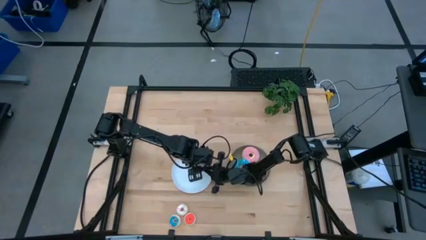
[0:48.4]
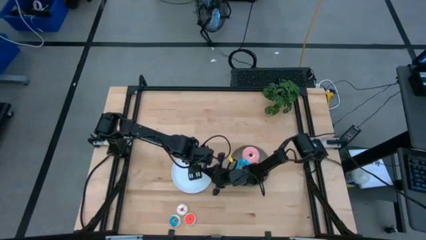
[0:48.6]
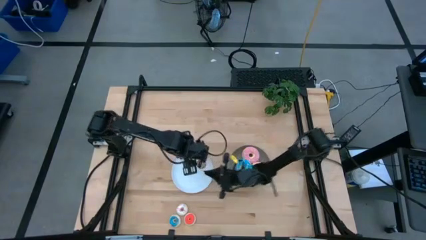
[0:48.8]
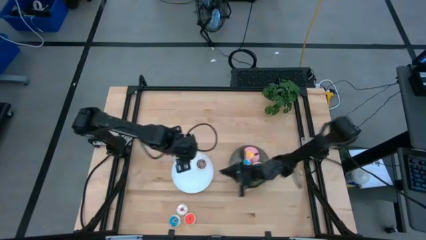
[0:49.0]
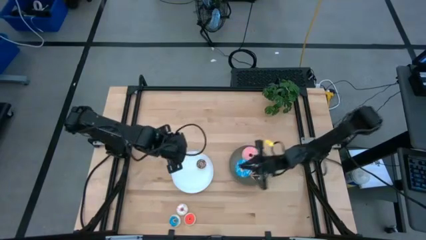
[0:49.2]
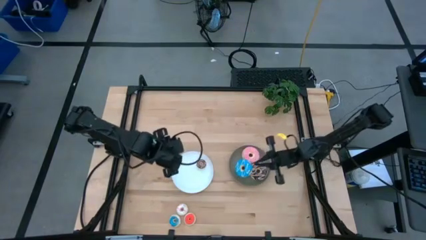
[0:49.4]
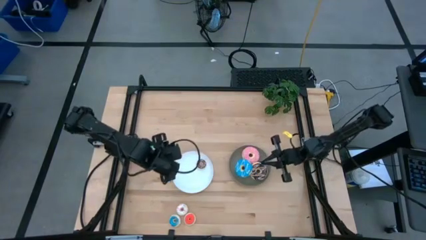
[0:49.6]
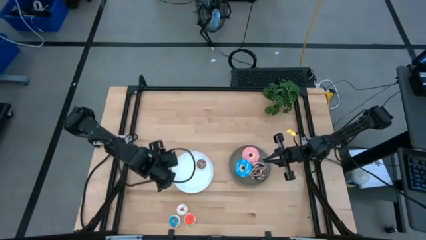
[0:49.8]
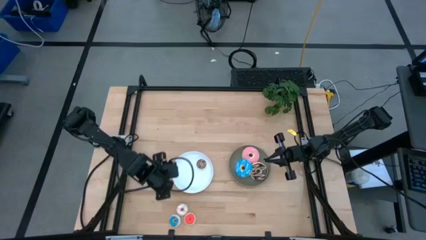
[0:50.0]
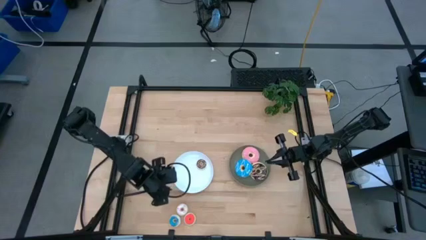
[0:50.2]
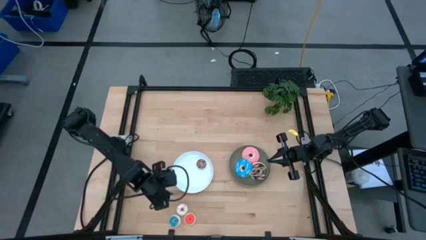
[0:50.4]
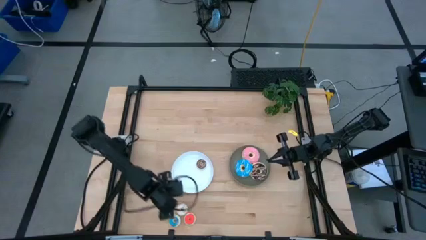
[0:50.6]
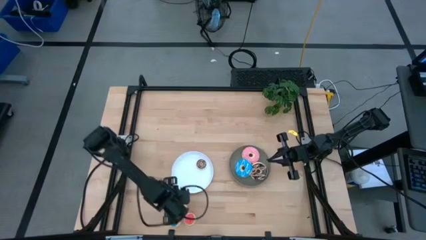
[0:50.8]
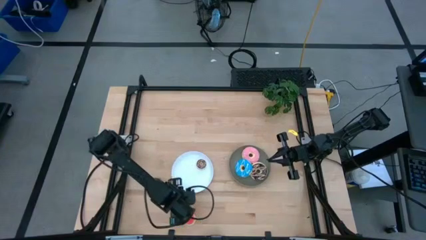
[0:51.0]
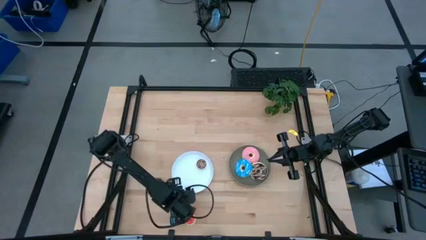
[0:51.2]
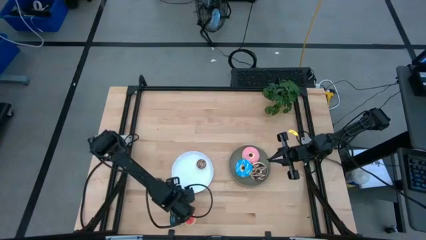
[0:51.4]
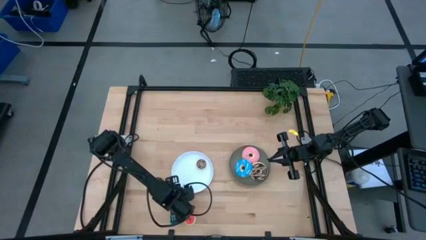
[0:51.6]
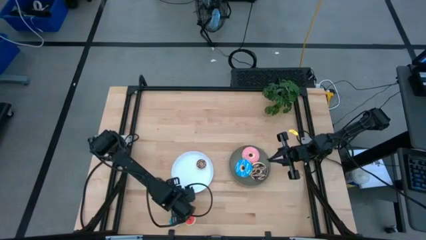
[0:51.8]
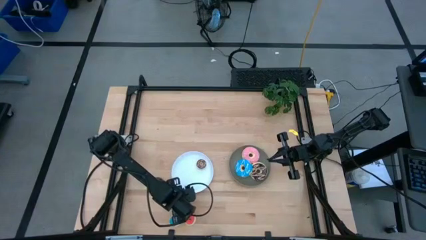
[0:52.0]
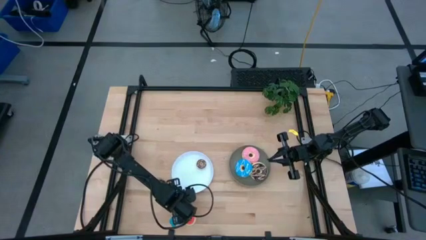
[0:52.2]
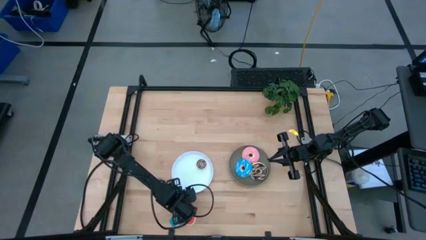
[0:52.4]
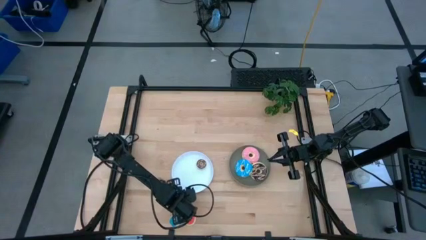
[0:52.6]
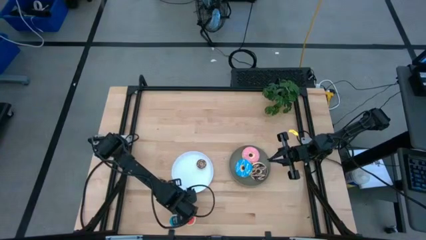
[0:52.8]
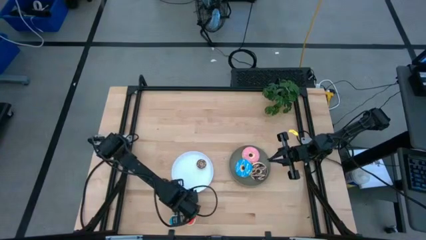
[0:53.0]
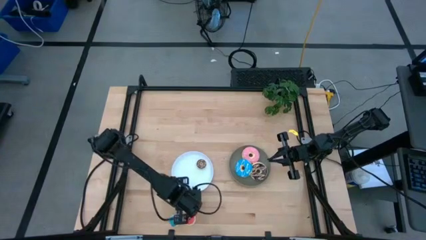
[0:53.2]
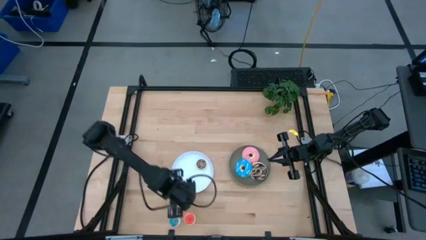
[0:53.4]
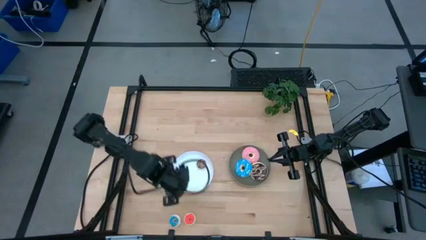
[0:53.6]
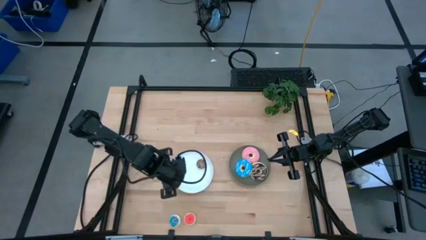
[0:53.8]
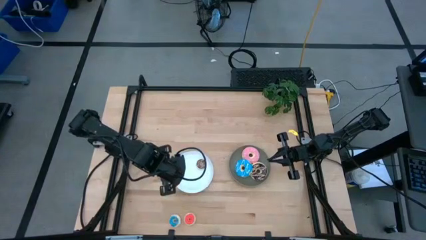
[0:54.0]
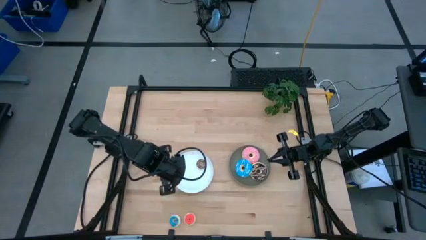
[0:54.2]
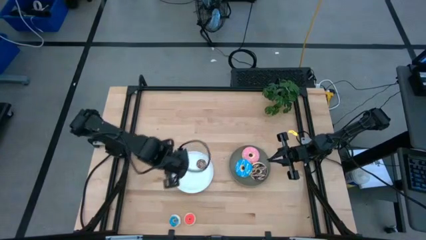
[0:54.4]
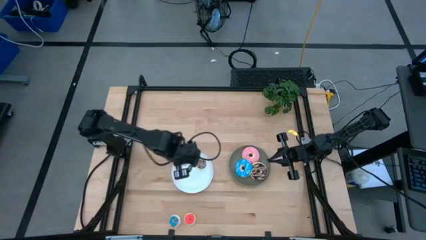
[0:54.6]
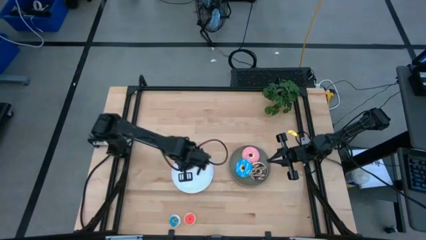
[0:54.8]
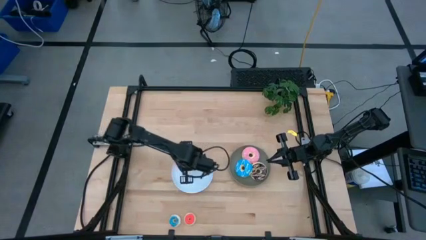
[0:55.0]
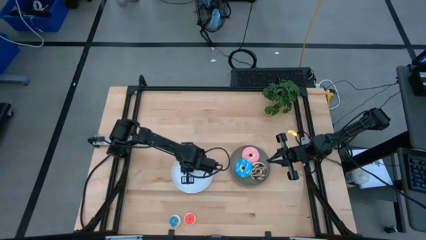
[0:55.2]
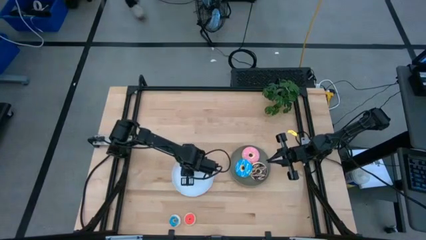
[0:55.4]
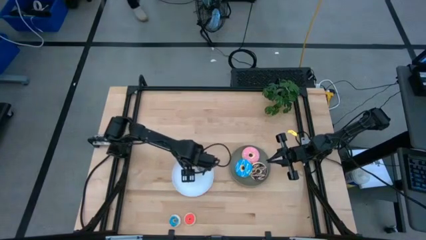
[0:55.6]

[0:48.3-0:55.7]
Task: Pick & Place donuts
Put the small white donut on the white plate

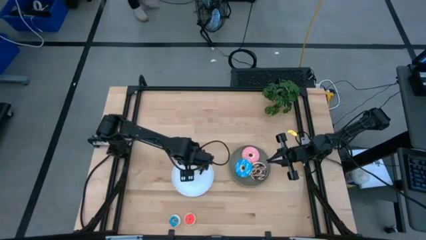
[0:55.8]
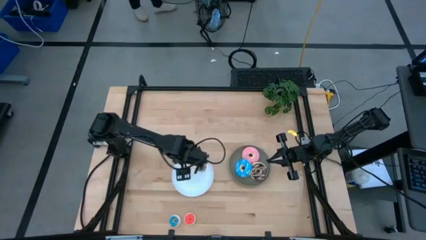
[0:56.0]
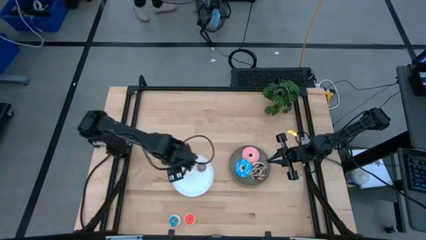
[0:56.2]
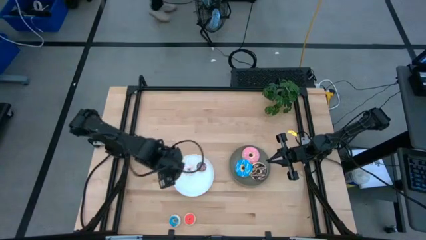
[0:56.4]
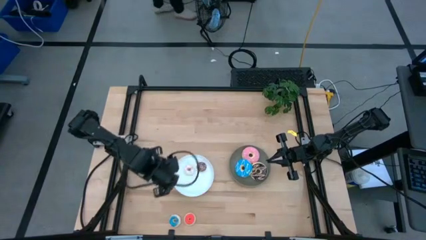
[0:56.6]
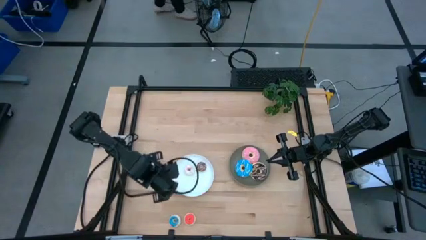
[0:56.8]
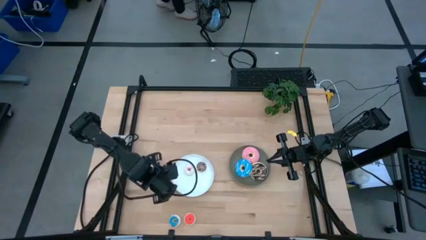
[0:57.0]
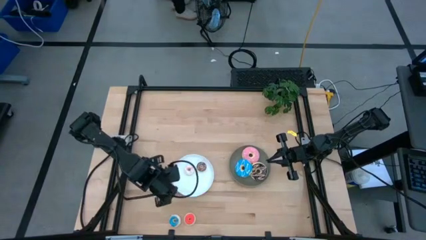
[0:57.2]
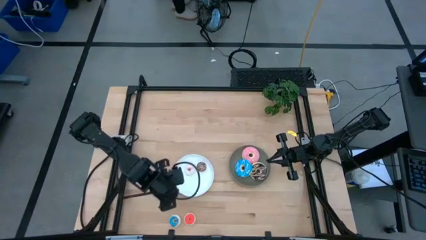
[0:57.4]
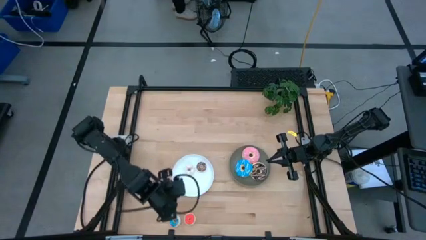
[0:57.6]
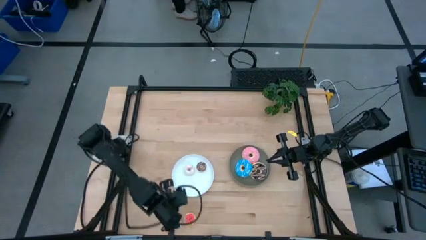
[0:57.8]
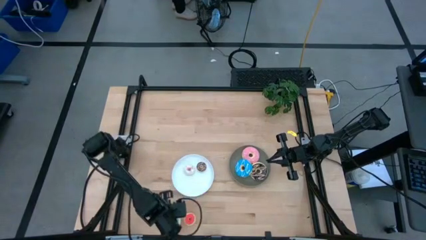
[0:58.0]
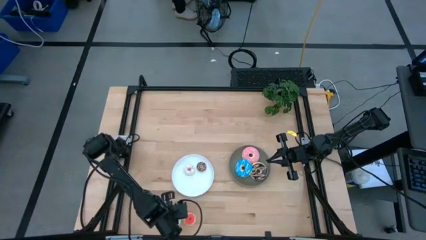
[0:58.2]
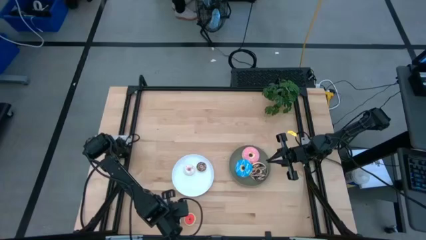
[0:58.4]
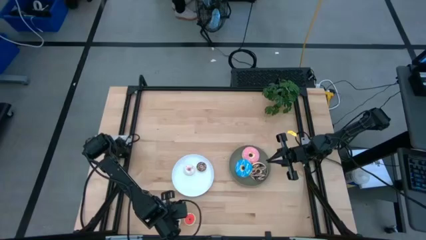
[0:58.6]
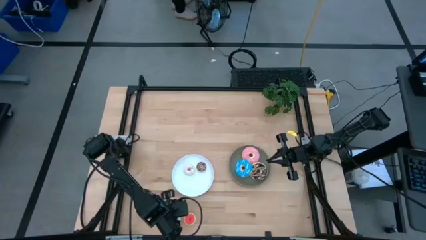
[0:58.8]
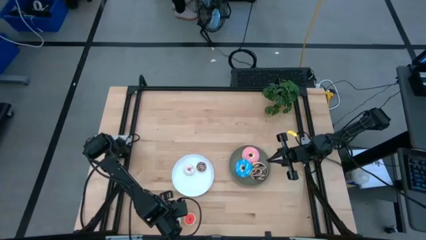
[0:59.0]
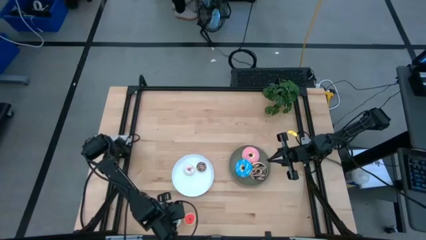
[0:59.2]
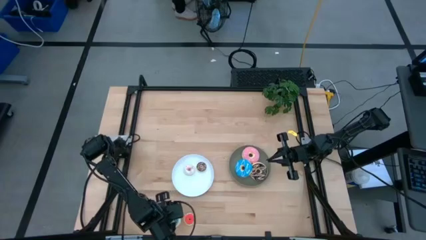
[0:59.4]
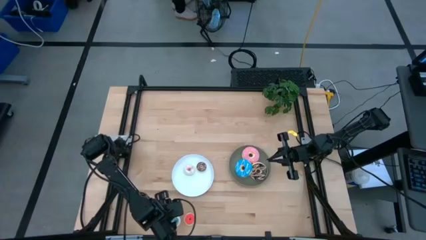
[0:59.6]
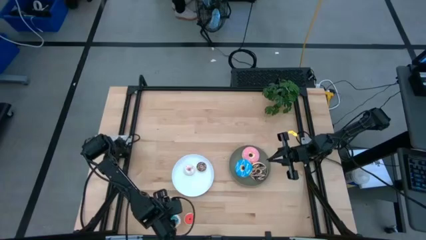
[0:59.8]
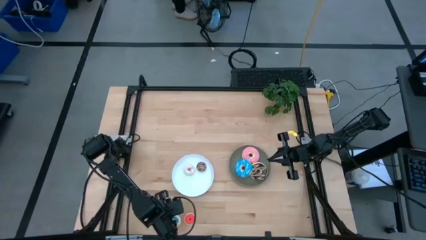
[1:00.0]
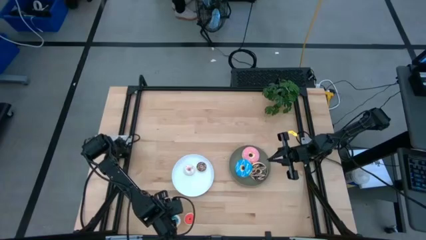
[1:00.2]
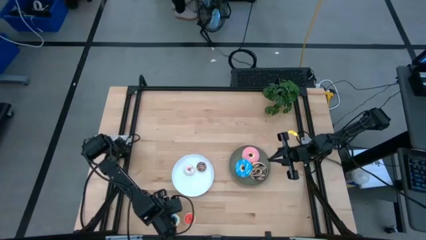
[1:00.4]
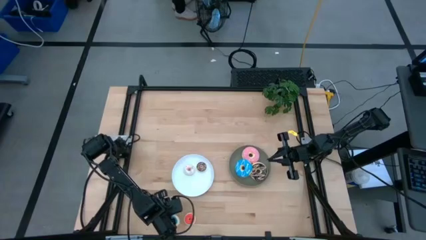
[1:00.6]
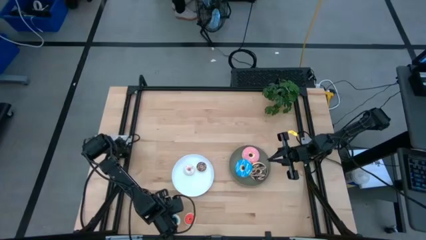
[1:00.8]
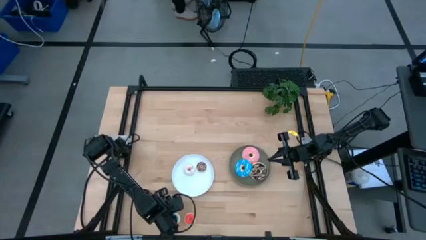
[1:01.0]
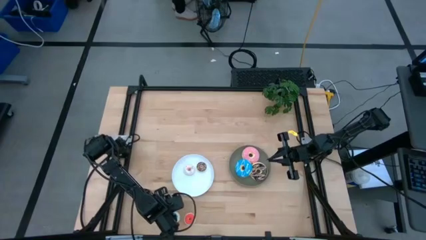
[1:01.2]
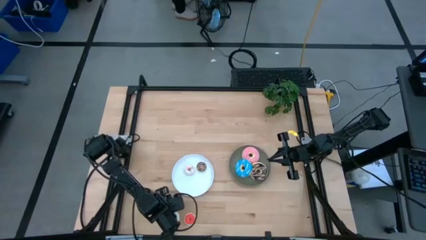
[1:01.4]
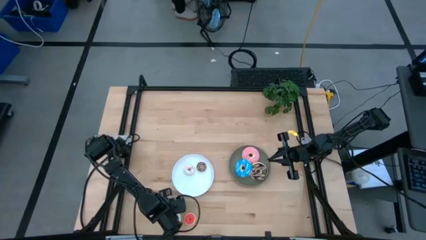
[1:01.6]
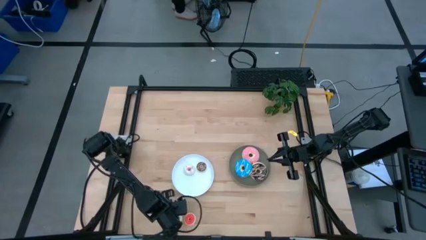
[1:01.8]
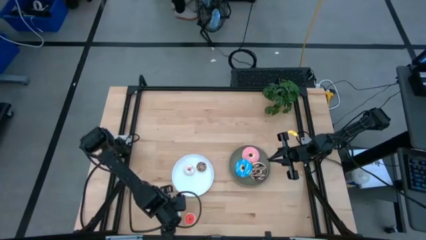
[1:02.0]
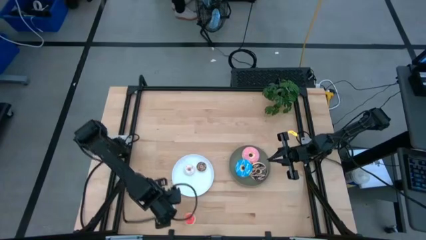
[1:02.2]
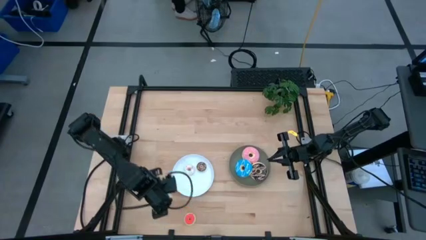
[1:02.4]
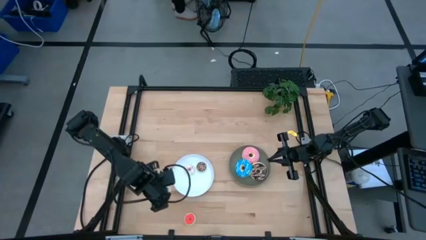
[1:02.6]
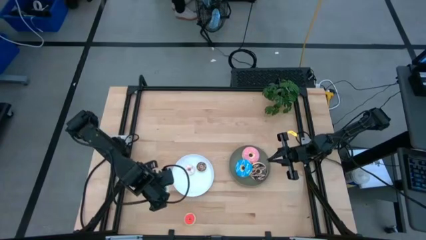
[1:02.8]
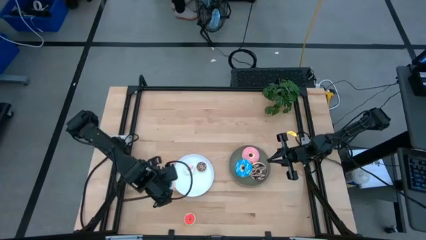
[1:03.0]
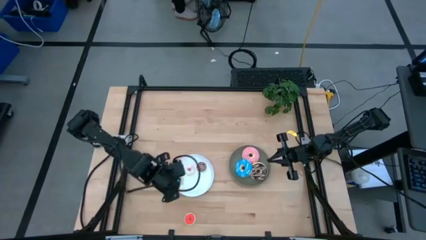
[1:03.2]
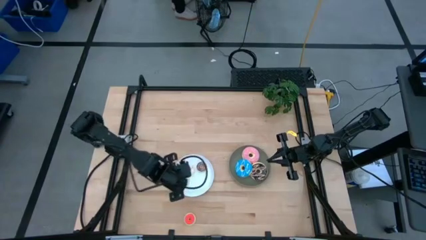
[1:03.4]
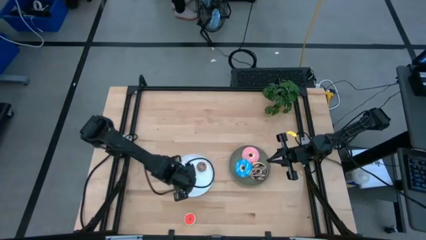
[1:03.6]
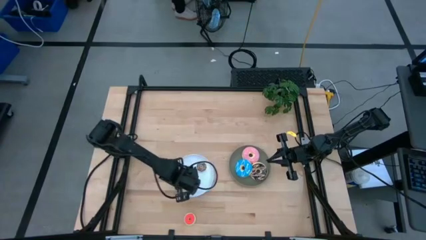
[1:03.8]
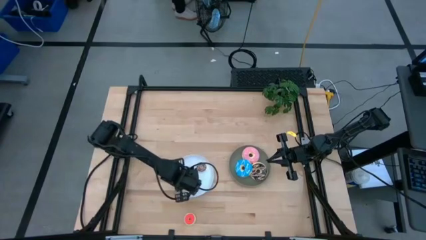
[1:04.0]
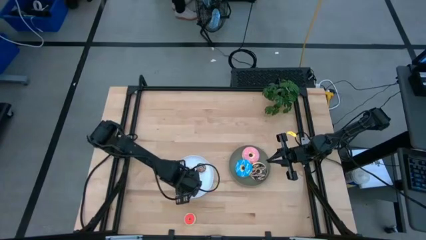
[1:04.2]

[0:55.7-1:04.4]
Put the small blue donut on the white plate

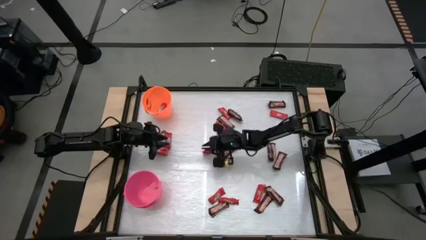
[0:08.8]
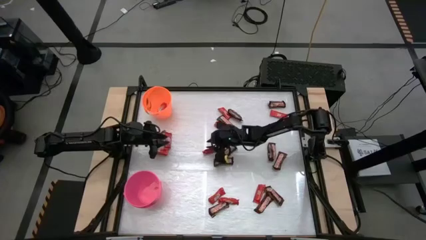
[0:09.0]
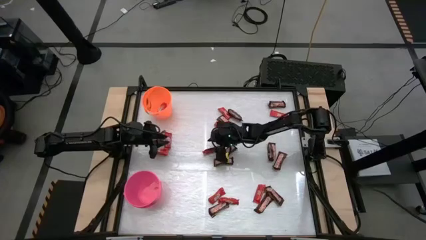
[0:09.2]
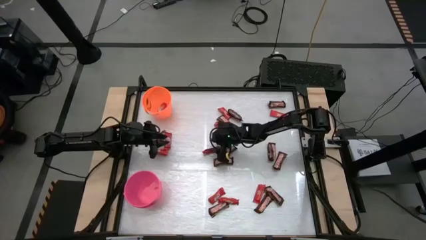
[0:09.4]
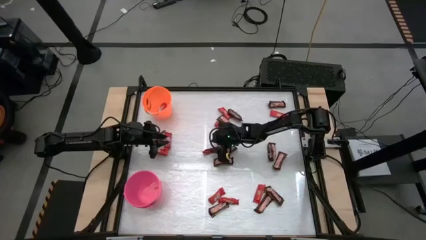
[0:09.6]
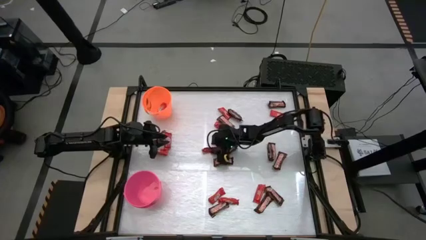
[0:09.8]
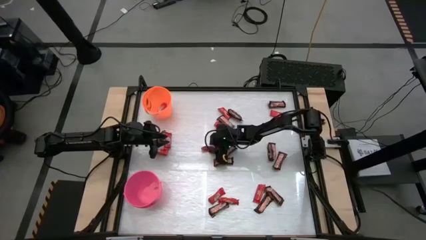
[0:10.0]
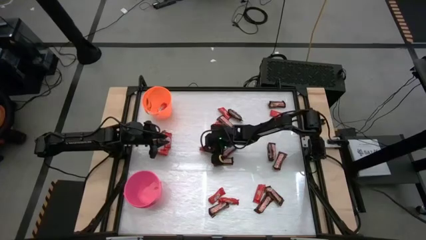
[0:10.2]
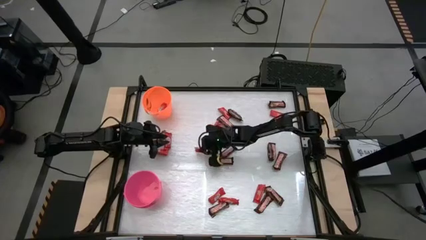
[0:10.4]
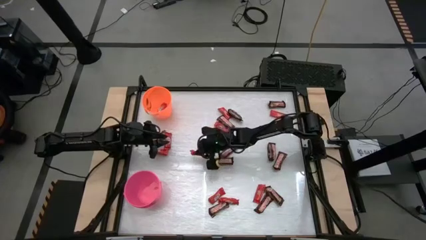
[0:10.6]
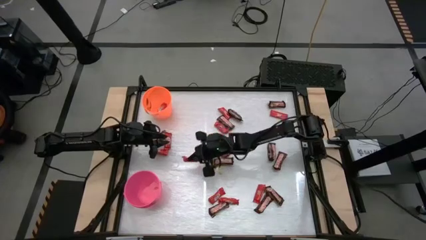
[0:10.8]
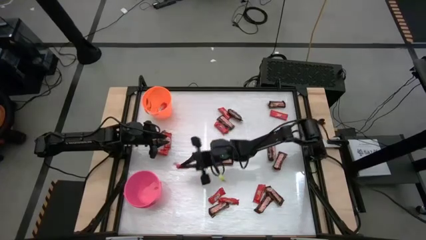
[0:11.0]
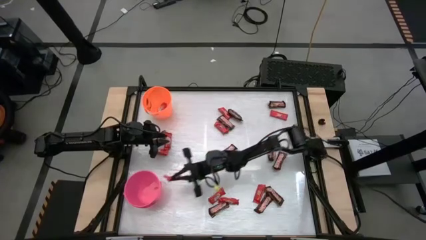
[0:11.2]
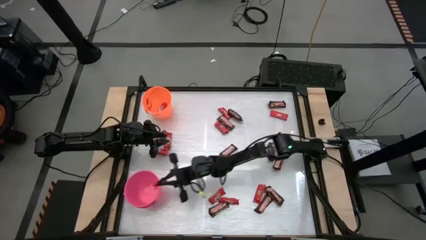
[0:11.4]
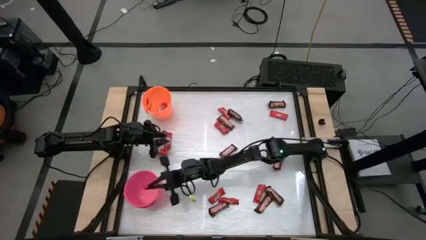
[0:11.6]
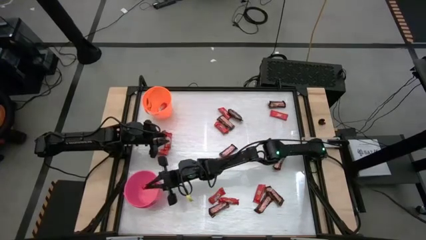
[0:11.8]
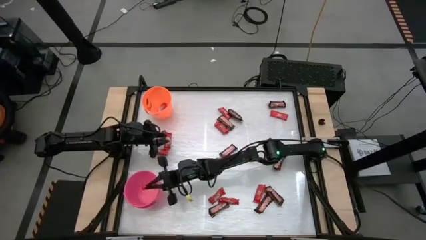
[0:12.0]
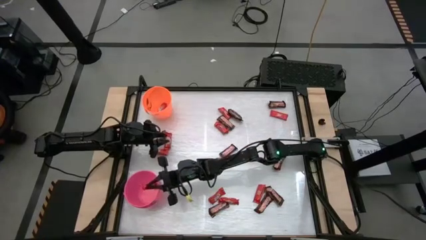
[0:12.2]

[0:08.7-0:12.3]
Task: Sort candy by brand, put in halloween buckets
Put the red chocolate bar into the pink bucket
